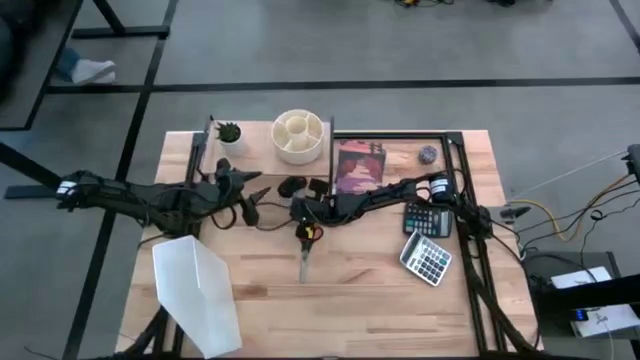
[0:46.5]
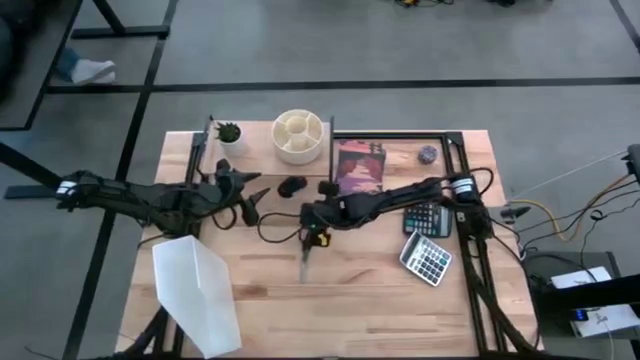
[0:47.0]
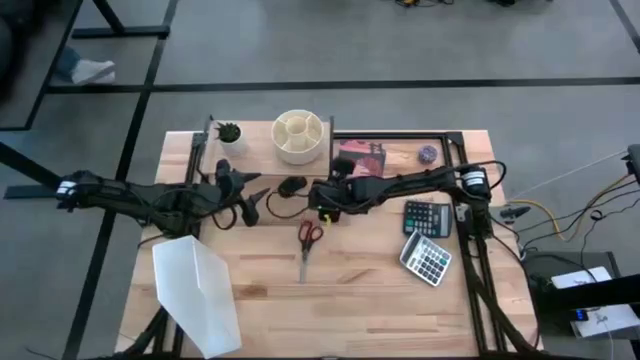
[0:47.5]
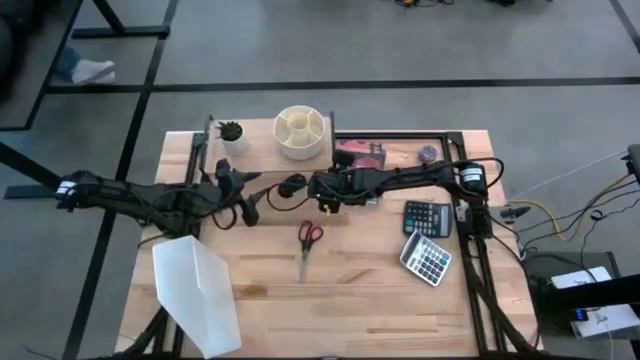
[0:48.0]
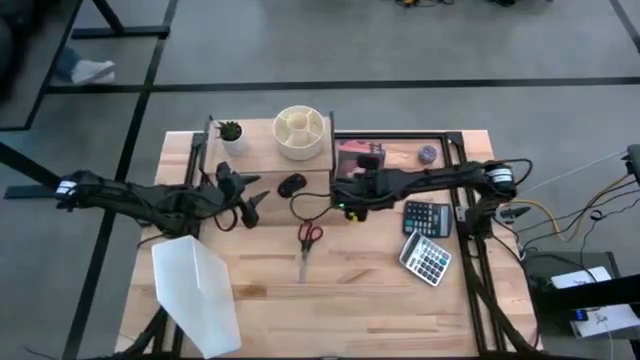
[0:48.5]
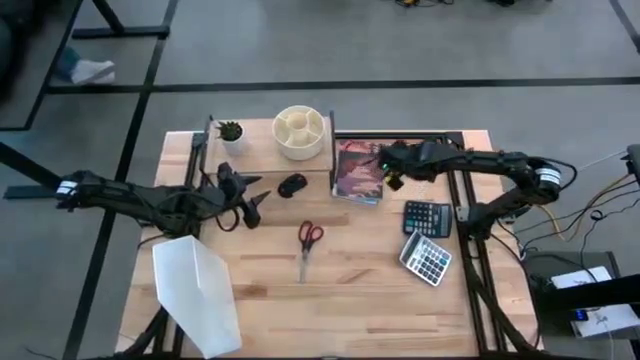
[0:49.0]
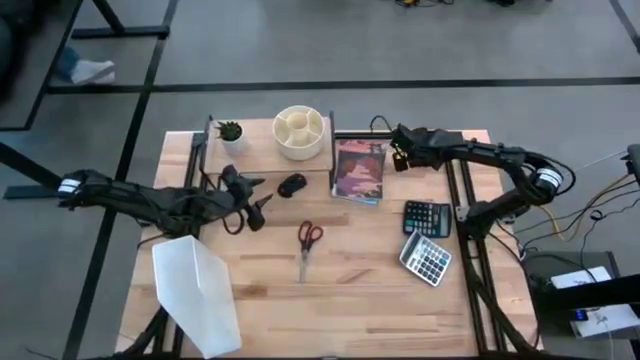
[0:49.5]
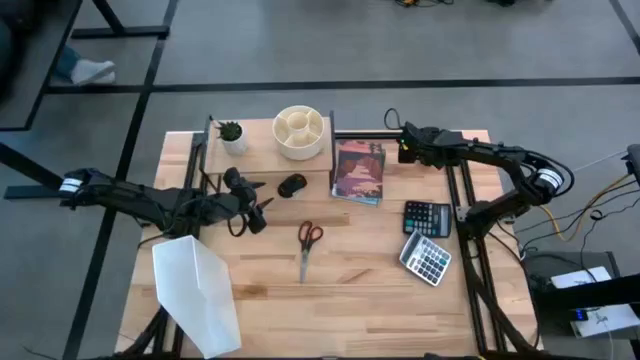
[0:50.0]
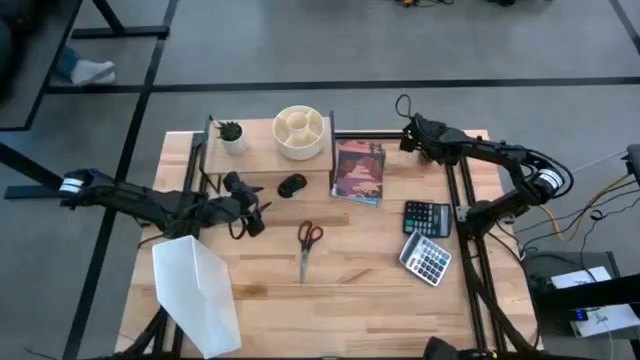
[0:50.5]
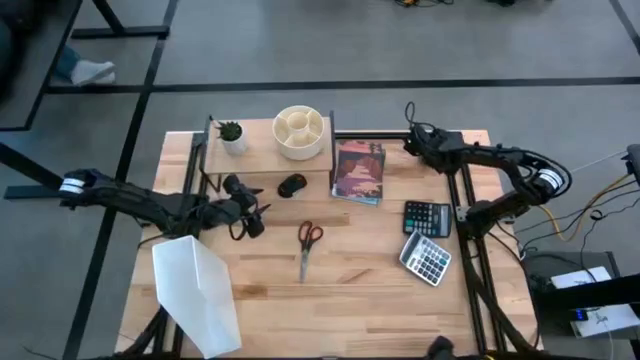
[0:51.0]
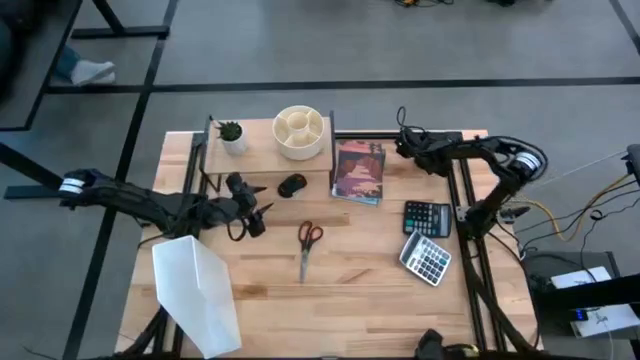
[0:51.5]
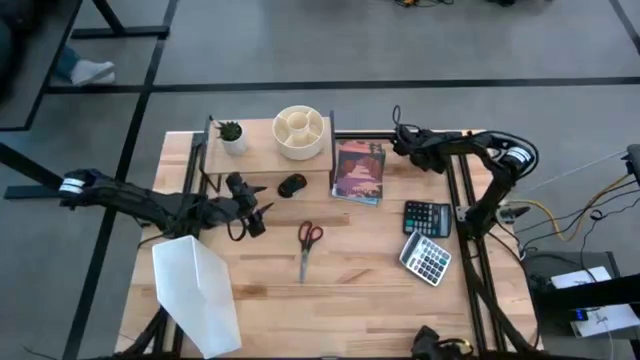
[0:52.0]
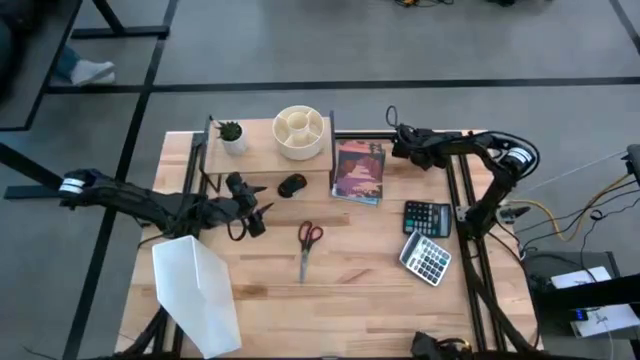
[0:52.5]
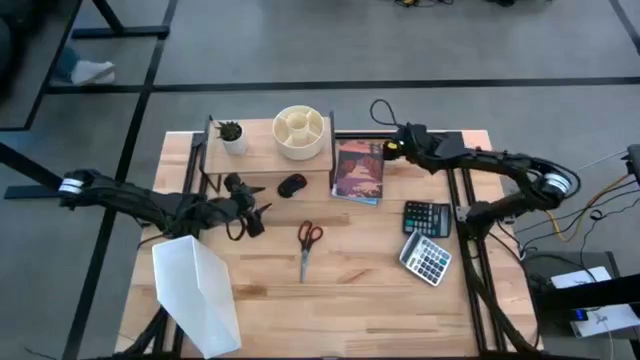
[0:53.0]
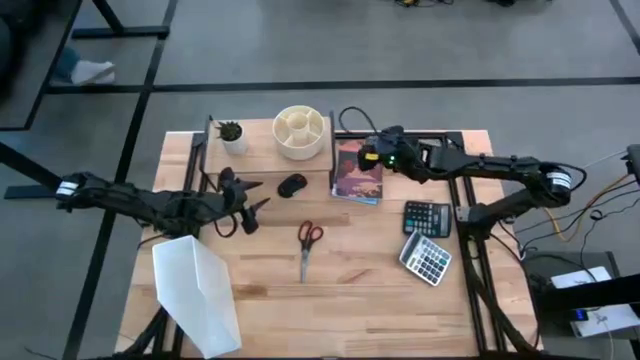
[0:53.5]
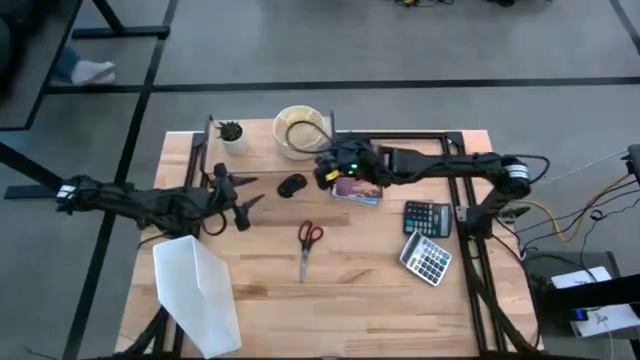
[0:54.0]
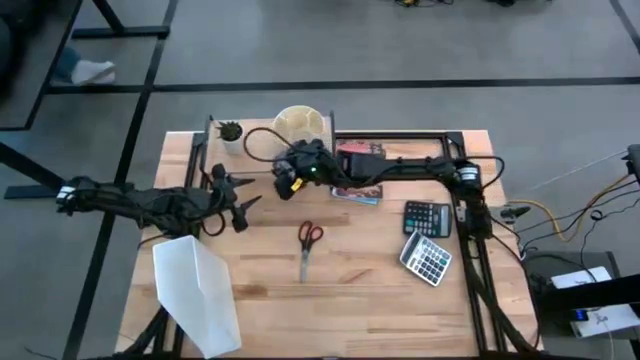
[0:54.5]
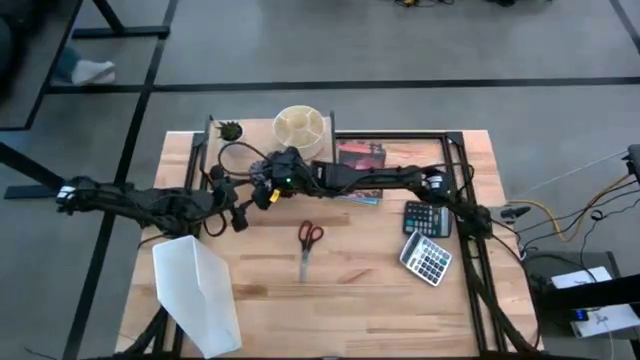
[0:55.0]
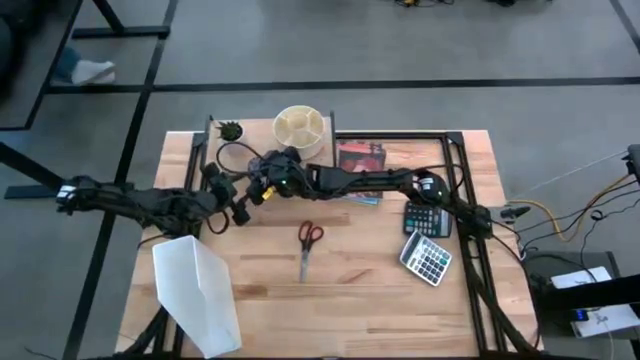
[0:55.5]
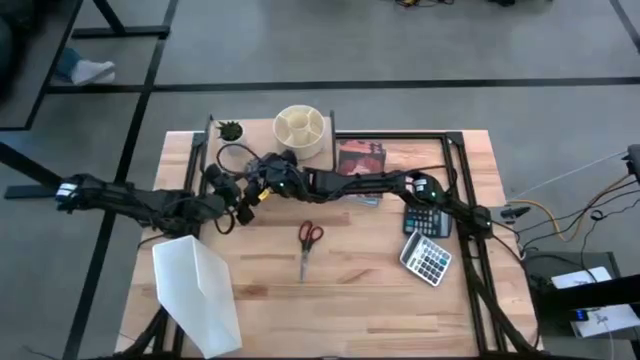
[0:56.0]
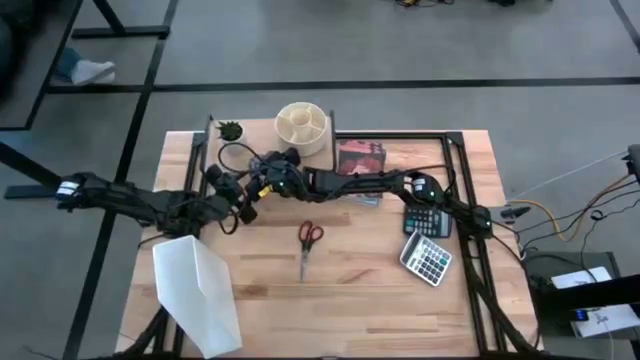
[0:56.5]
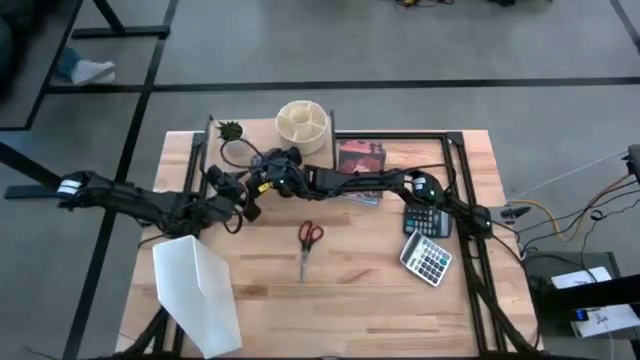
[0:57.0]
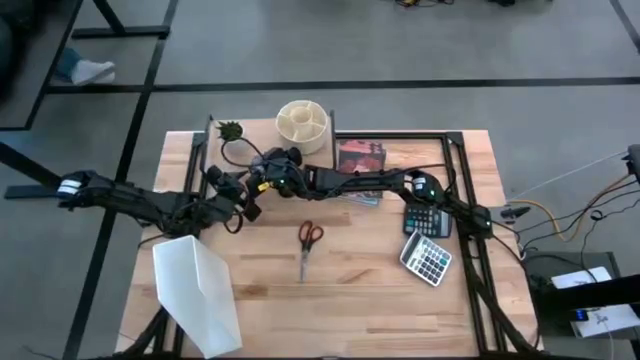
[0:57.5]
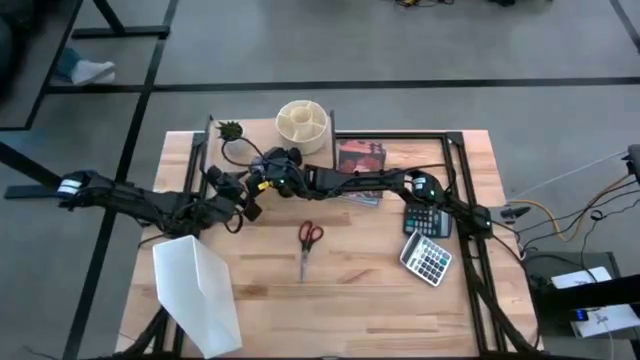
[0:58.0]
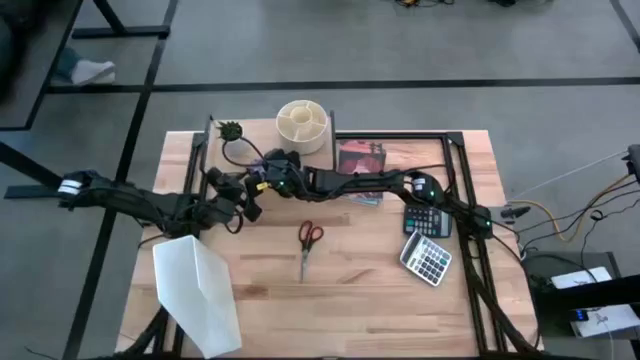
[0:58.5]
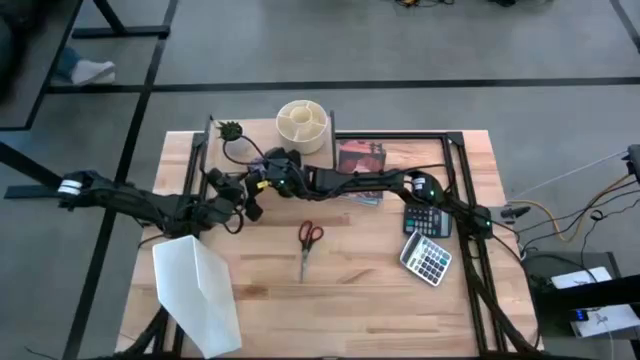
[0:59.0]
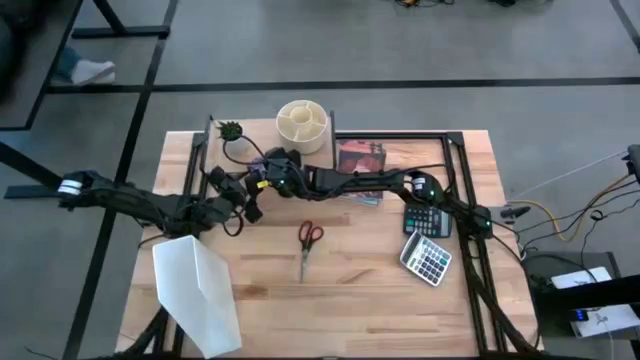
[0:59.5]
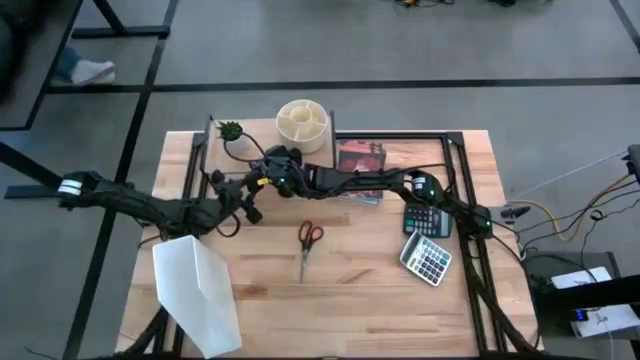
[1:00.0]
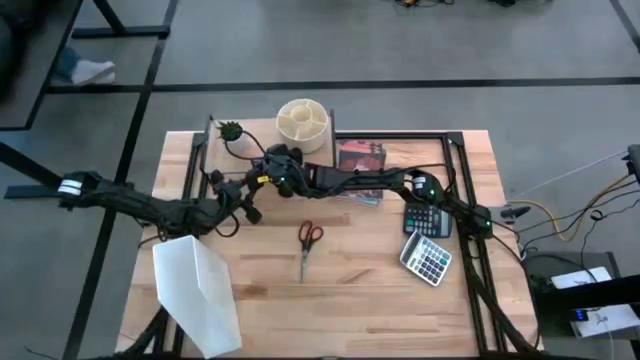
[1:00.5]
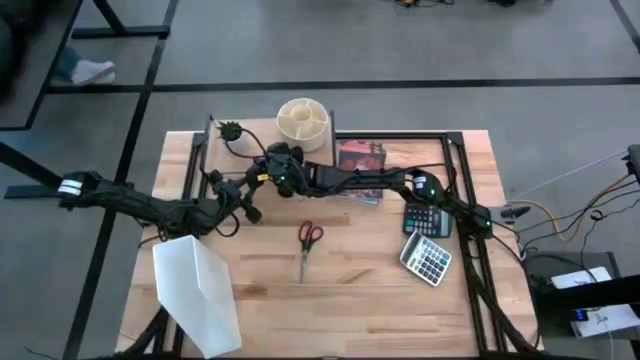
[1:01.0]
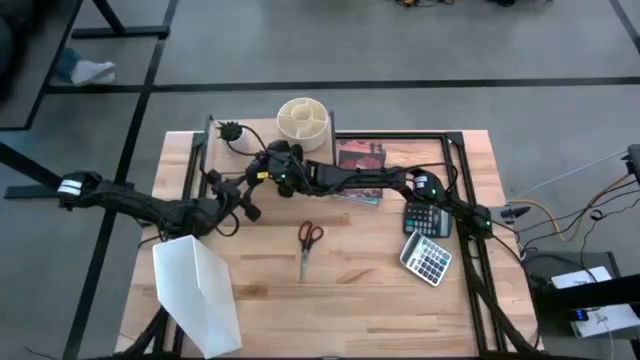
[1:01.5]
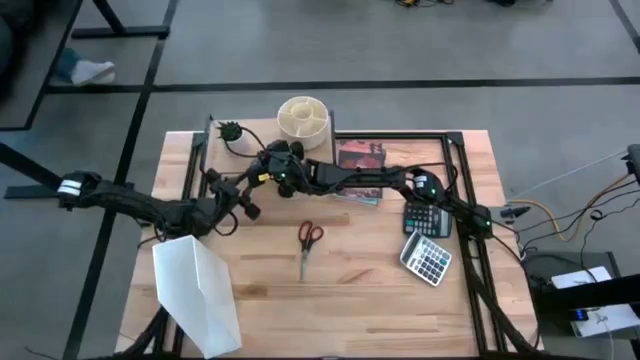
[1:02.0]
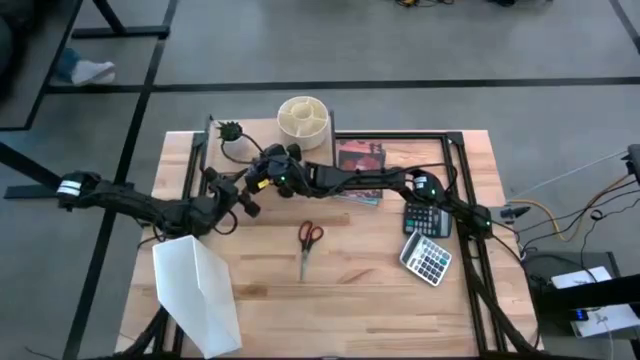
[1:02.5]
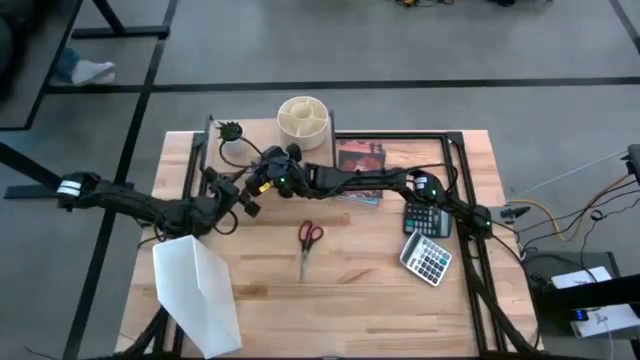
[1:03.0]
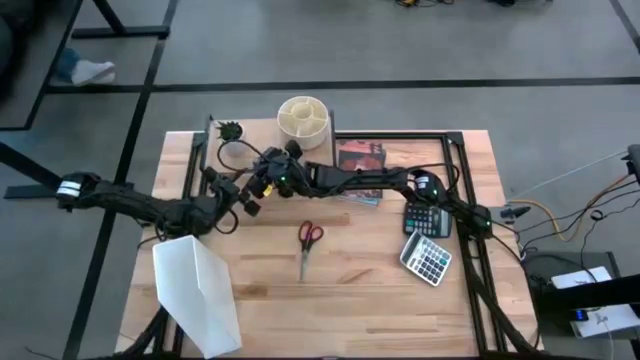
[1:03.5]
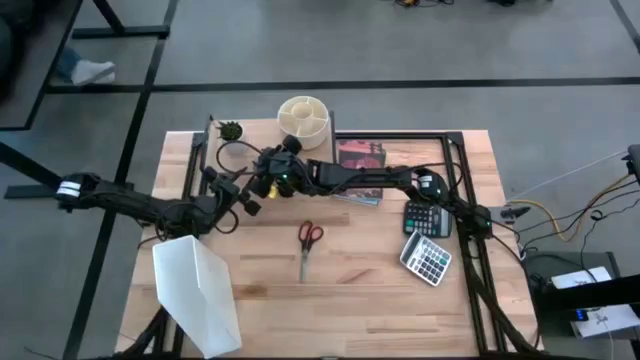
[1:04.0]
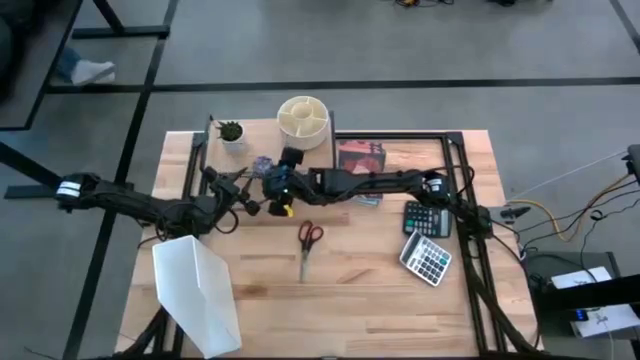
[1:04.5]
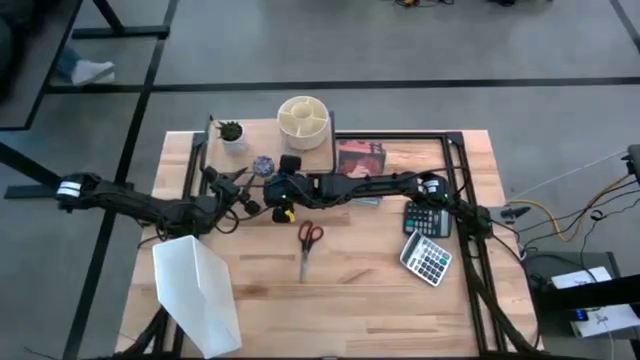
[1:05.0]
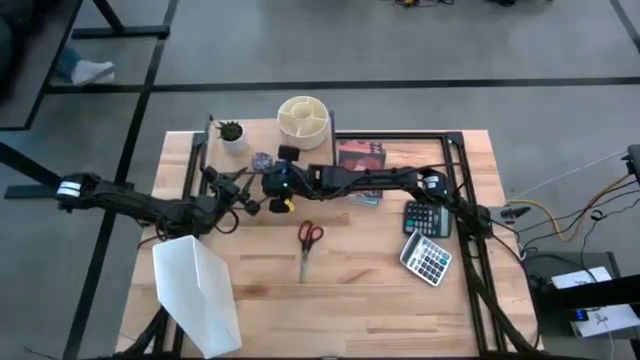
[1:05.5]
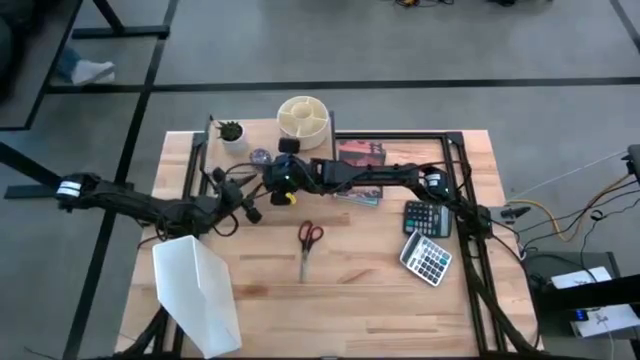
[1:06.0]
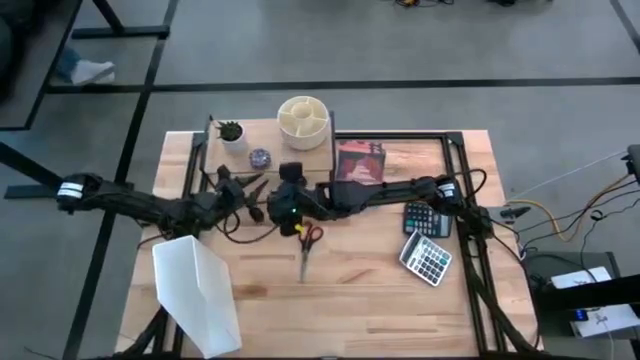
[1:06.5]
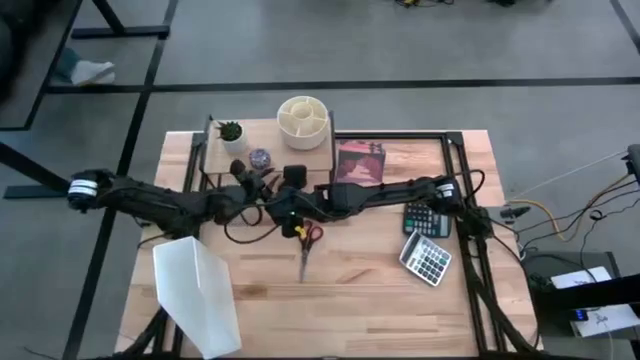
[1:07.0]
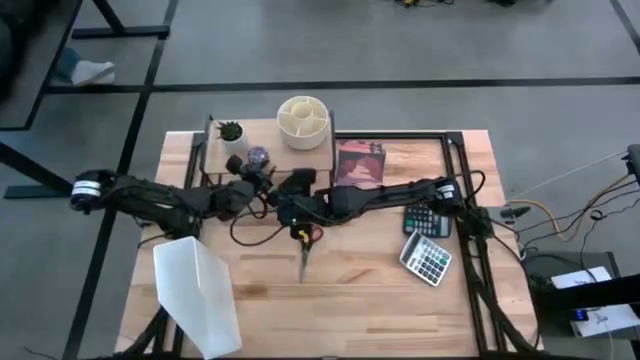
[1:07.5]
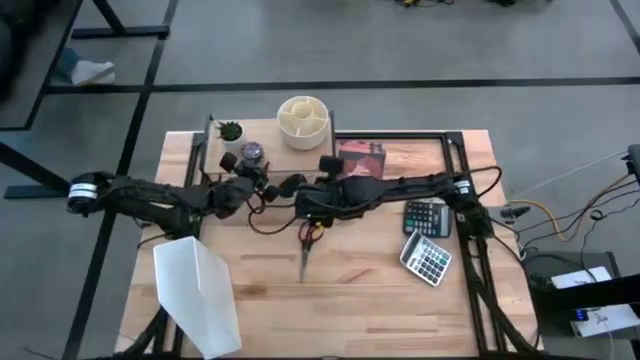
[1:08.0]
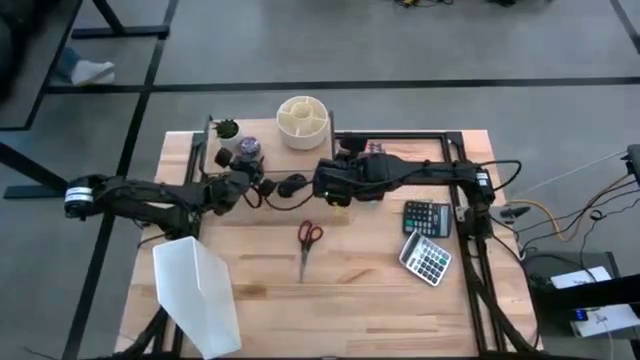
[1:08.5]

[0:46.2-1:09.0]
Task: Stock shelves
Put the red scented candle on the shelf
